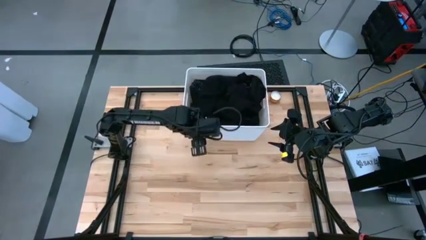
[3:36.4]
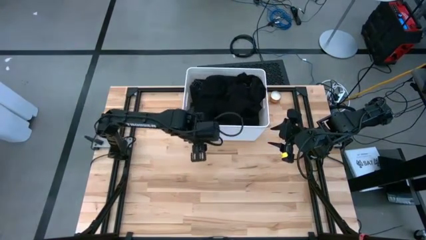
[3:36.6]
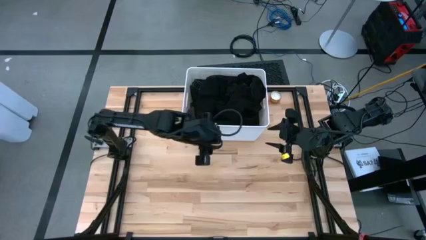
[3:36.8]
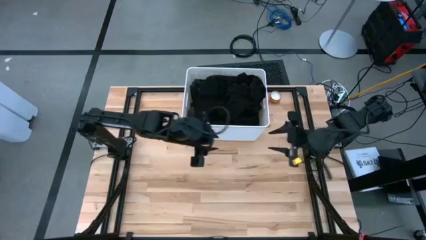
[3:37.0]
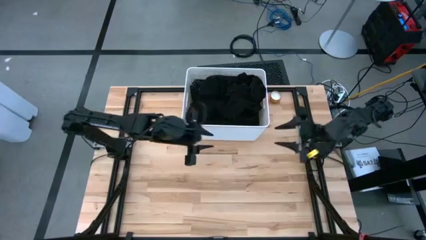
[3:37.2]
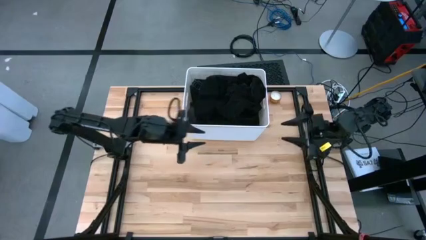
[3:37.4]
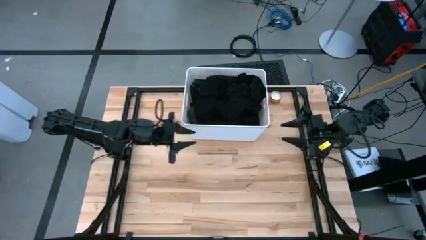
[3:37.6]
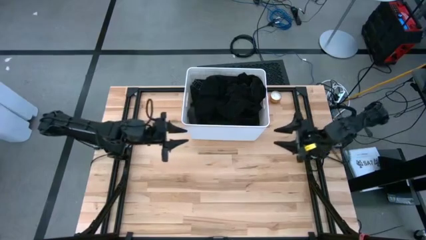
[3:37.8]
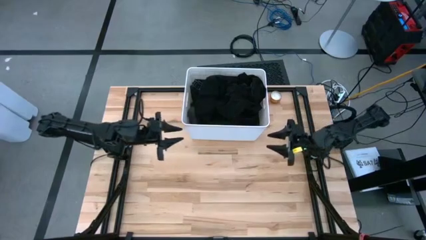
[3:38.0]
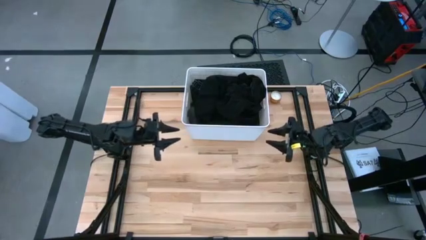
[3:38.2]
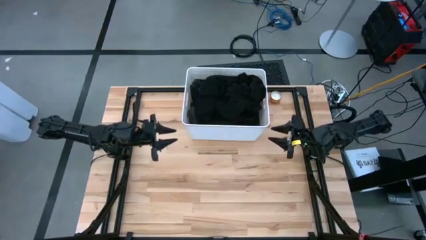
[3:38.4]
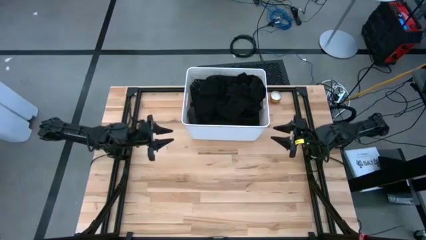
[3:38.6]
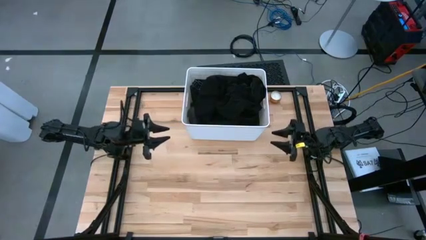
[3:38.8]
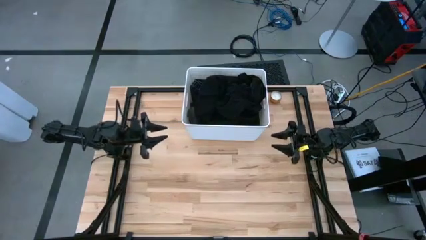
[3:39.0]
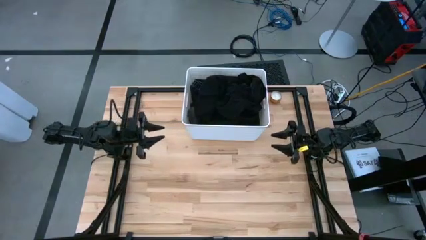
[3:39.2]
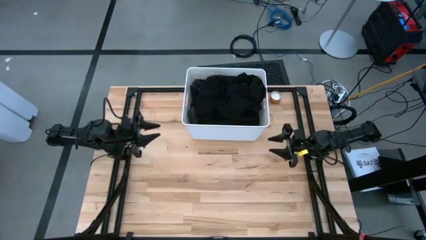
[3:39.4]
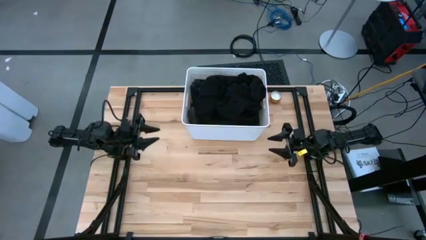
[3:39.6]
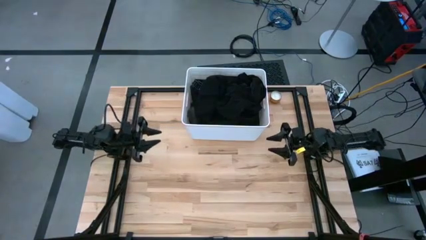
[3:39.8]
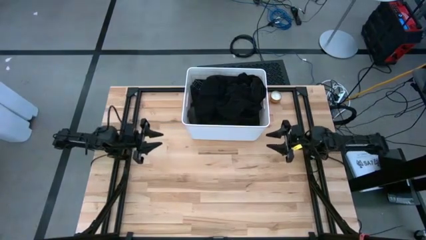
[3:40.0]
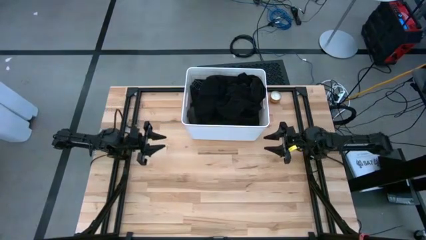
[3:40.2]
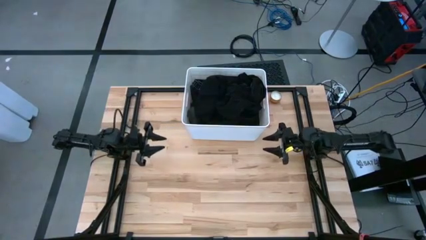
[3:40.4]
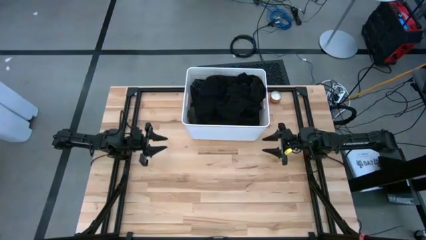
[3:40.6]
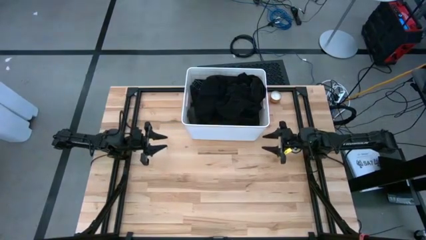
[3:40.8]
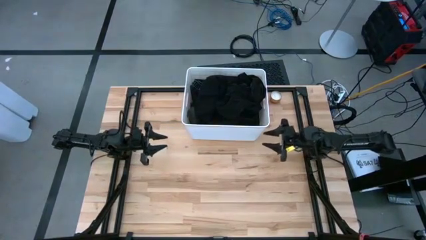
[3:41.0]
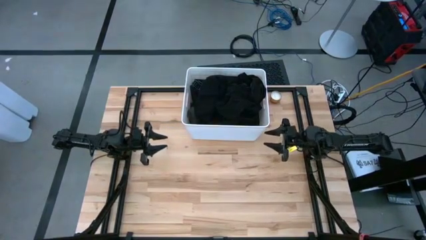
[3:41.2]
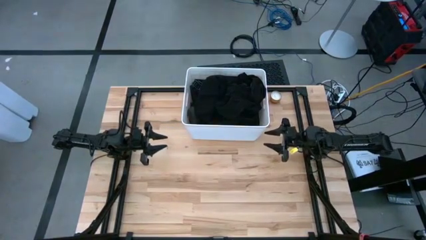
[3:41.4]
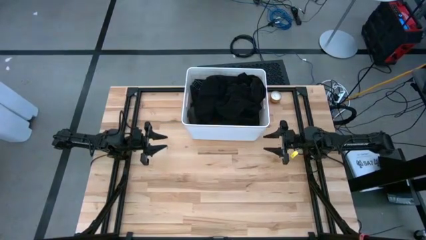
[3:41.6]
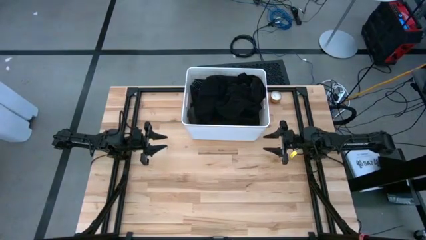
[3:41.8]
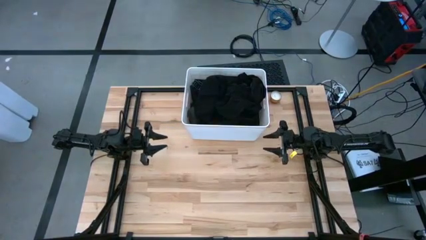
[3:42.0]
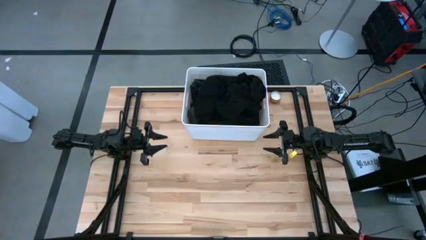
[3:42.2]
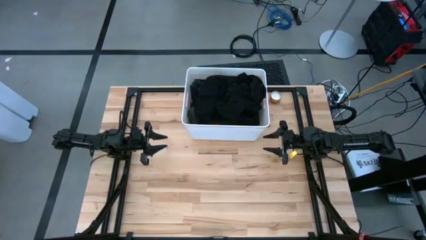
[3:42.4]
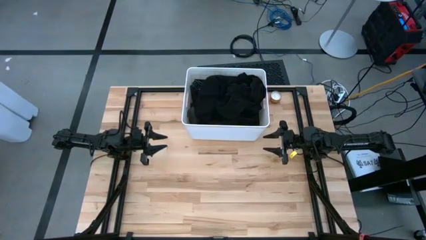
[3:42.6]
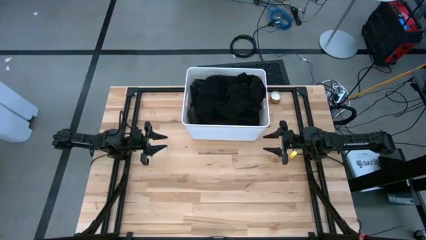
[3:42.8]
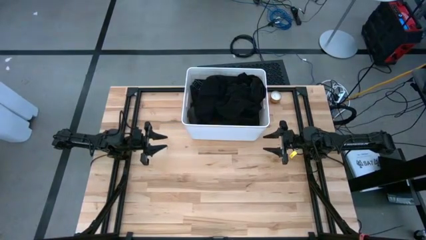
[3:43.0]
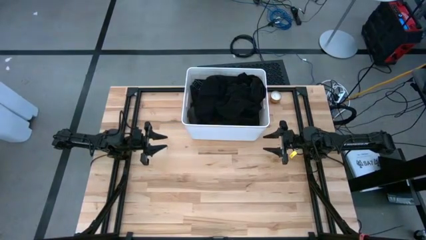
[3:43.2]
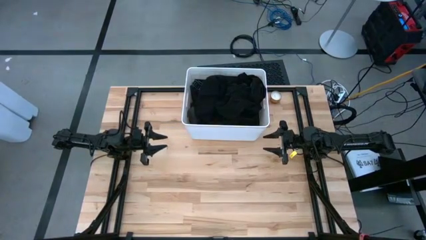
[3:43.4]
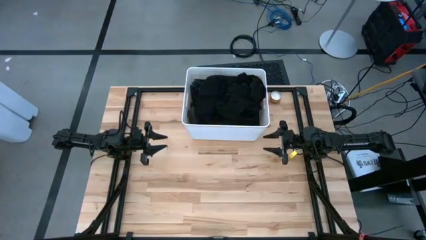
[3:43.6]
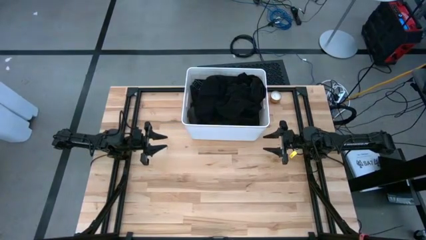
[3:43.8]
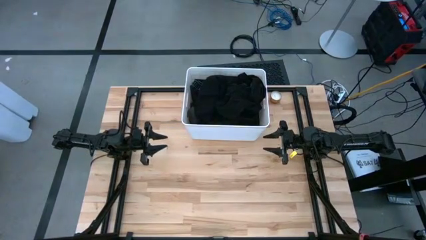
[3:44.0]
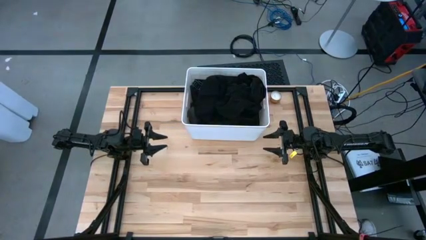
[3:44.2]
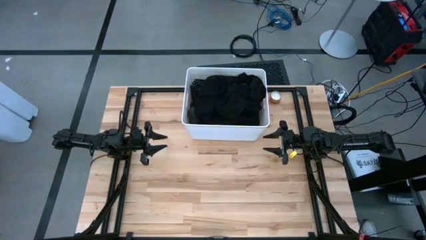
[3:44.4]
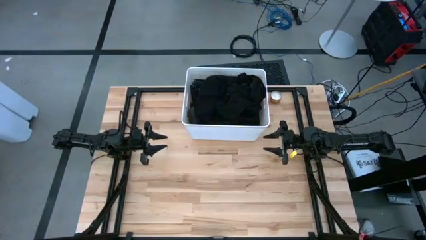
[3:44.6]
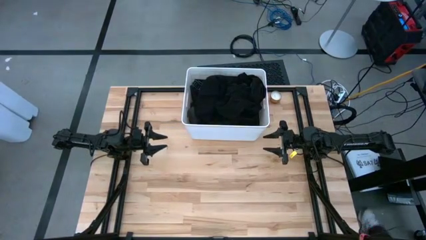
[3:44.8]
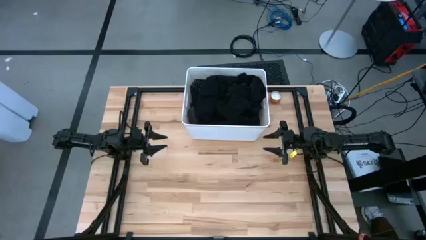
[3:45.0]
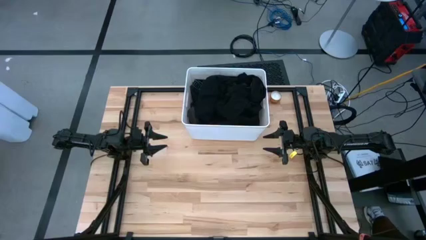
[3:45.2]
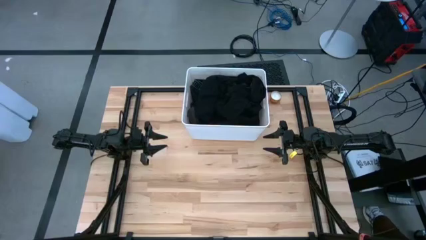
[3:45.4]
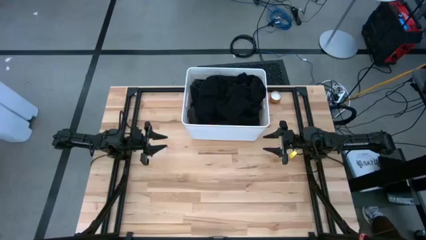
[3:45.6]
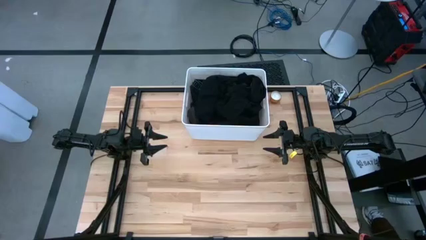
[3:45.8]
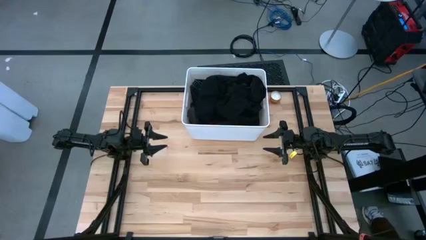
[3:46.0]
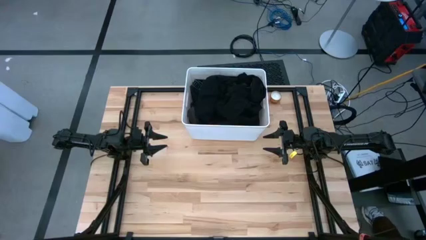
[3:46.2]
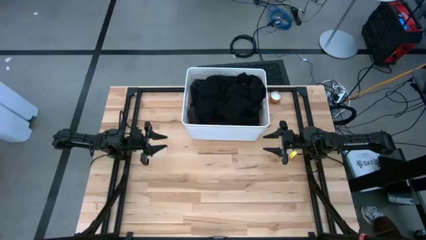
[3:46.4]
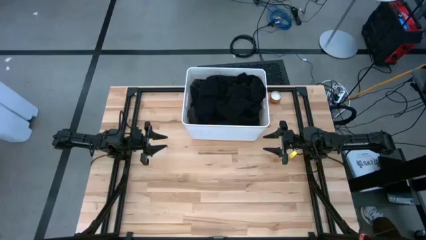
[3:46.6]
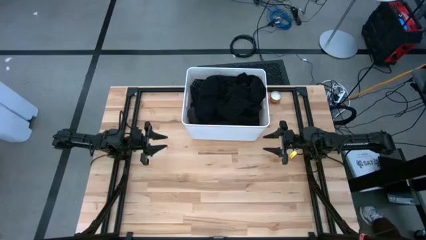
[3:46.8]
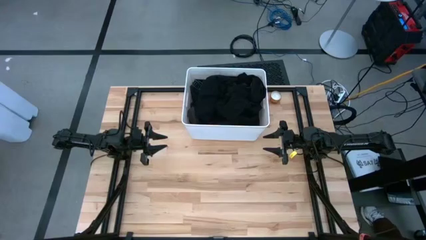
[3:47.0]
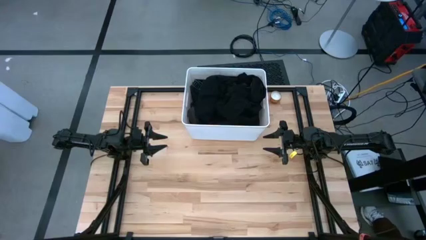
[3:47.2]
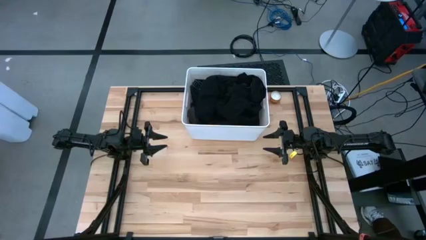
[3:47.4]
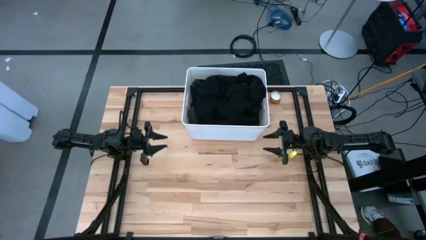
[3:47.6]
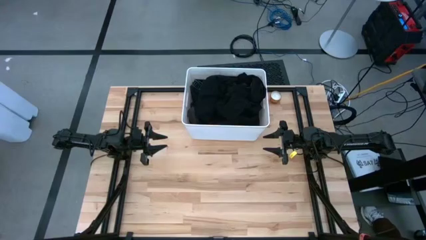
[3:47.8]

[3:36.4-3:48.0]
Task: Sort clothes
Return to Home Position

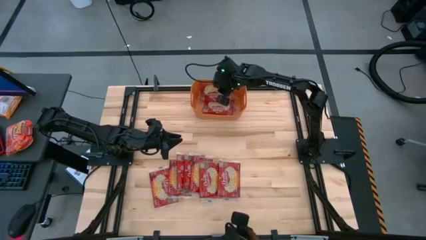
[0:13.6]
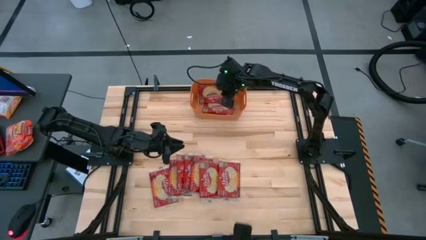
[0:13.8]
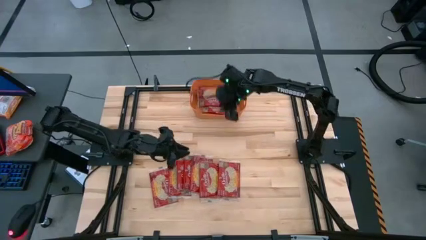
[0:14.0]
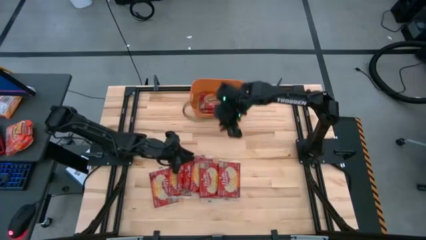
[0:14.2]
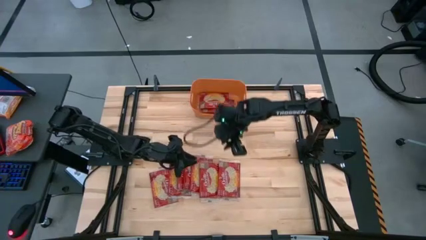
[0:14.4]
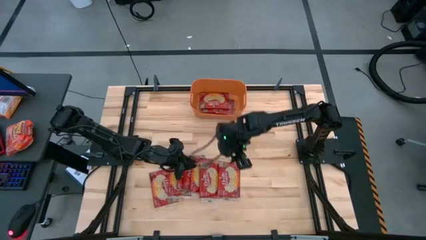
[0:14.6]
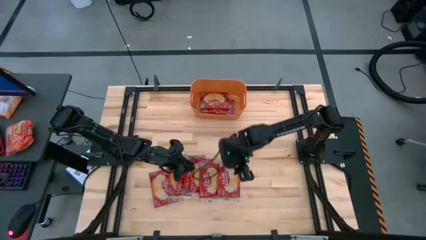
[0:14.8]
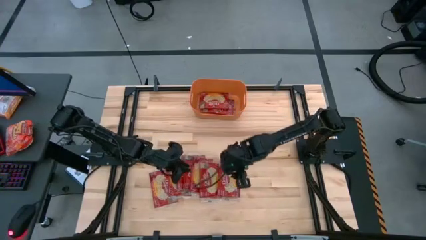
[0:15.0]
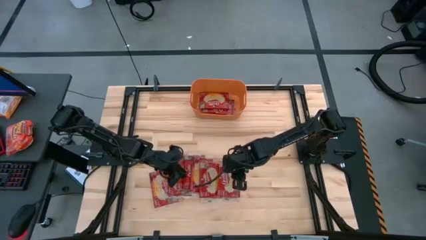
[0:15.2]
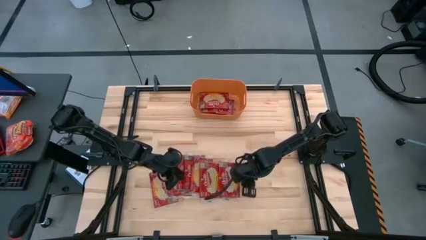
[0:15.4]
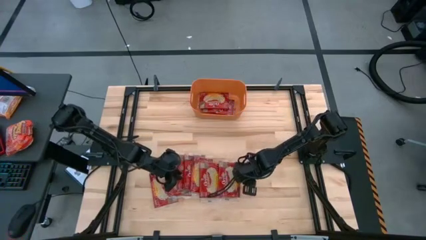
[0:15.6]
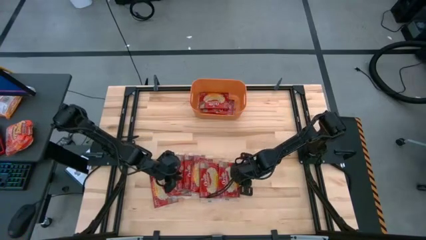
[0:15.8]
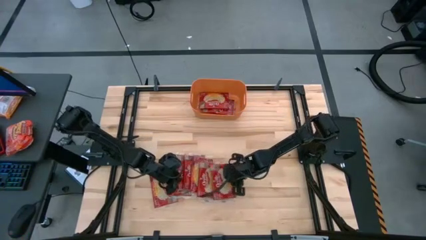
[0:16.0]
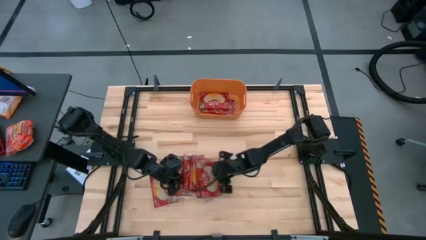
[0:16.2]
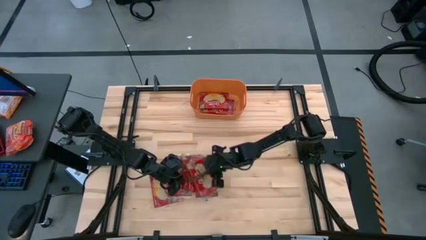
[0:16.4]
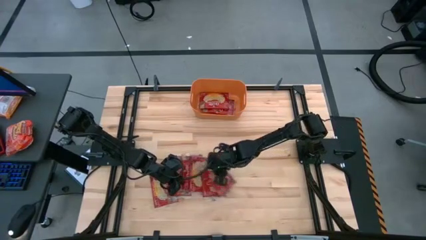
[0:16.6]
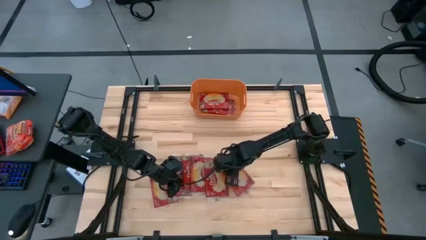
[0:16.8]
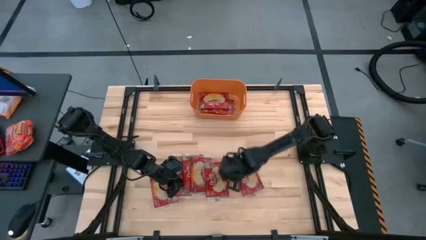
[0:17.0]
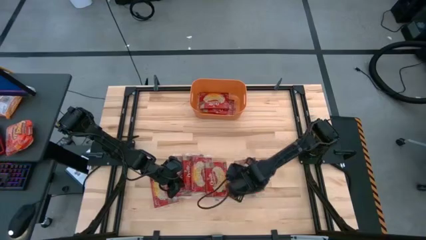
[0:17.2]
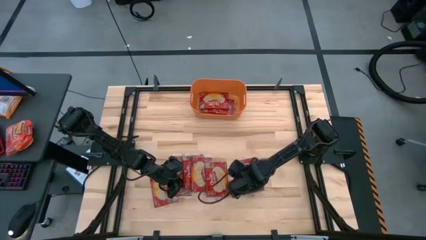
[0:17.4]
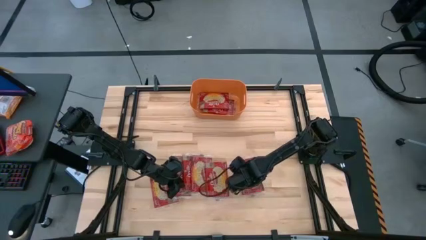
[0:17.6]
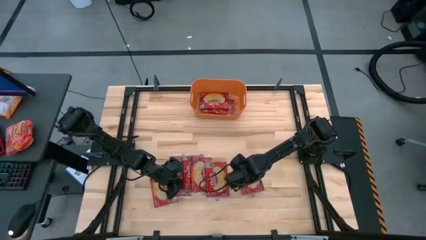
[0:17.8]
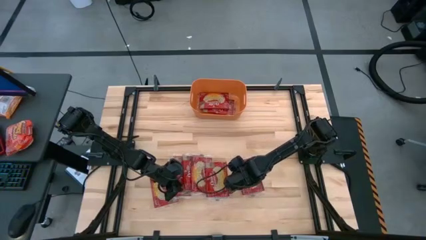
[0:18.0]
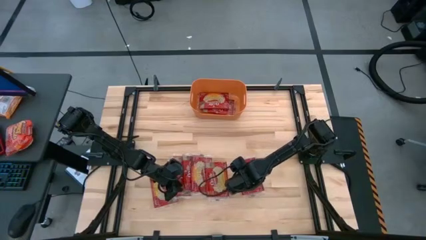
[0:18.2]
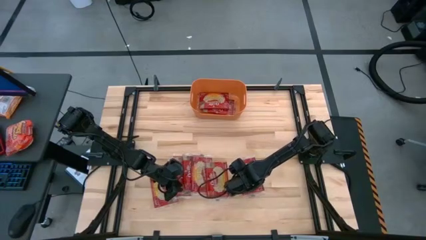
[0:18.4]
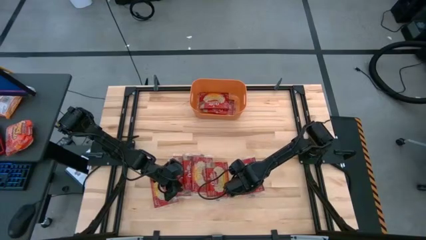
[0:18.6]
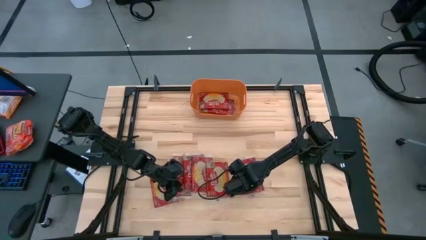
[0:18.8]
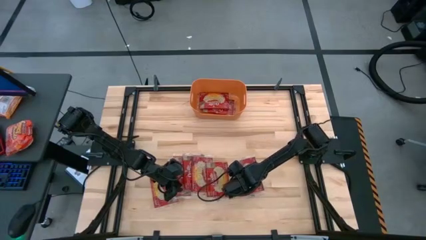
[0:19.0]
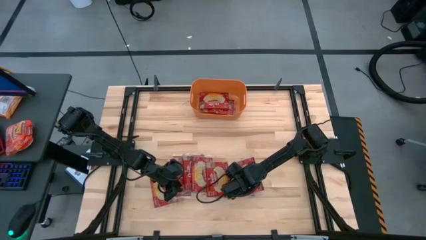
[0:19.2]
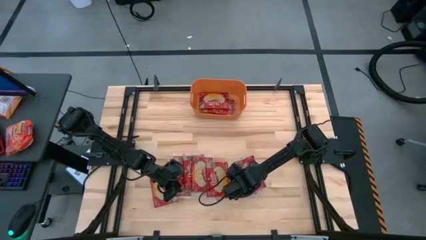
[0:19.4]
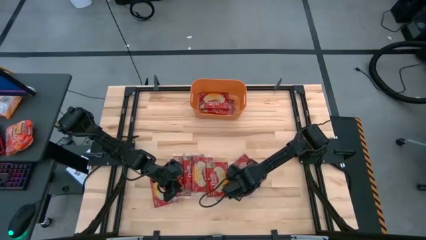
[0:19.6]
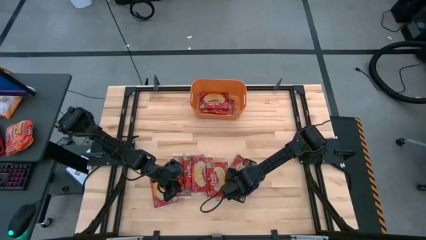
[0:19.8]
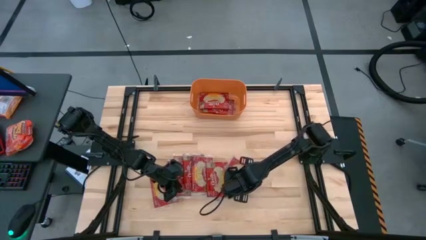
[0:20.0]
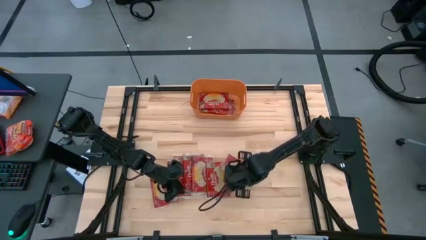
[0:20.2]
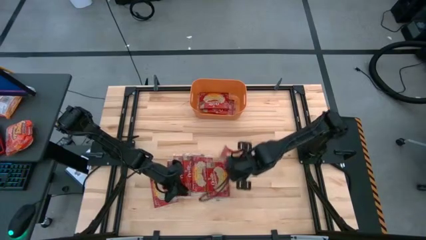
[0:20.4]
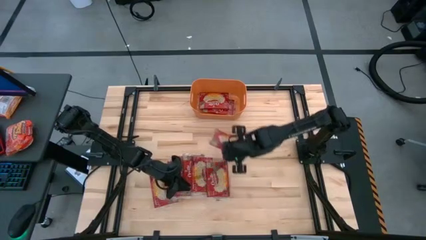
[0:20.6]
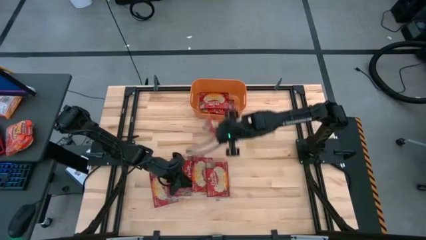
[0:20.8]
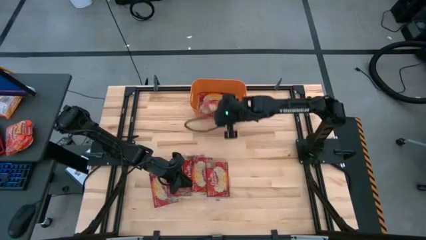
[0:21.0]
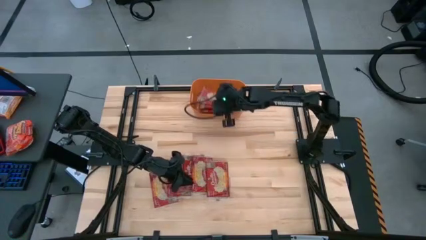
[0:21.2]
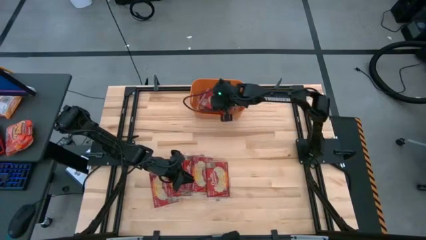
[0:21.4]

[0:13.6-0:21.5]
Task: Sort popcorn bags into baskets
Put the red popcorn bag into the orange bin
